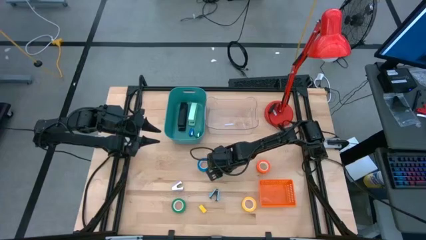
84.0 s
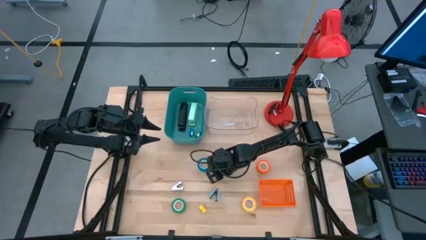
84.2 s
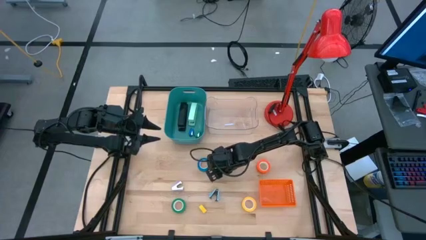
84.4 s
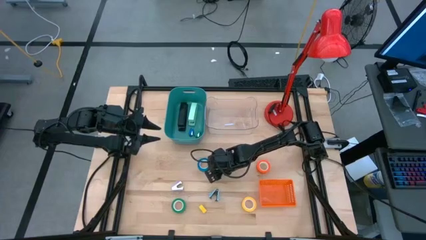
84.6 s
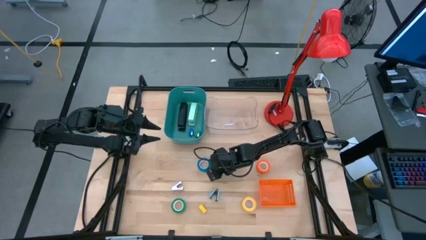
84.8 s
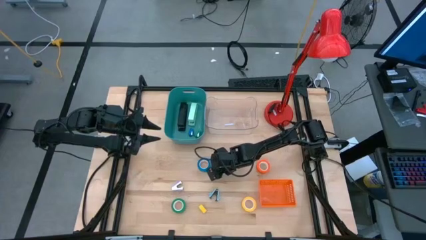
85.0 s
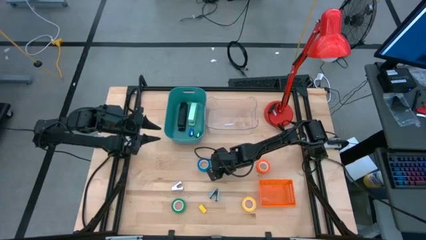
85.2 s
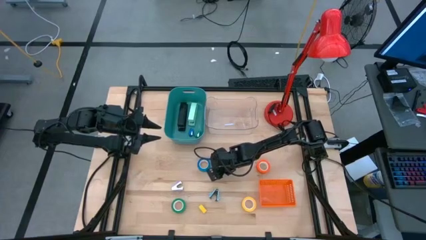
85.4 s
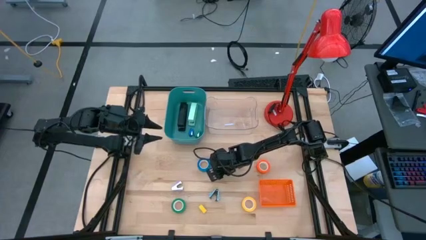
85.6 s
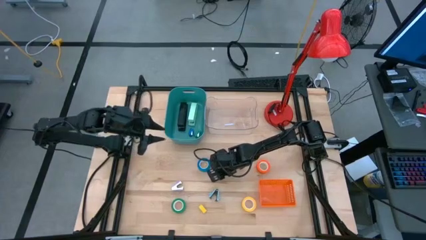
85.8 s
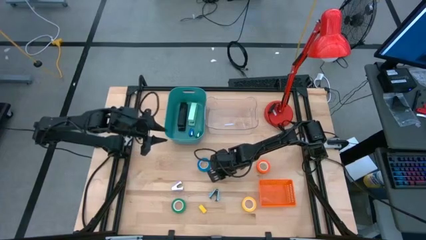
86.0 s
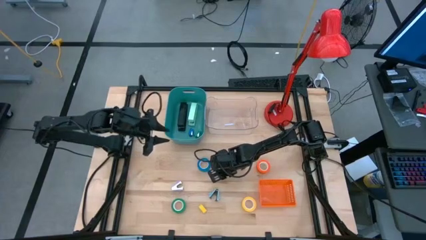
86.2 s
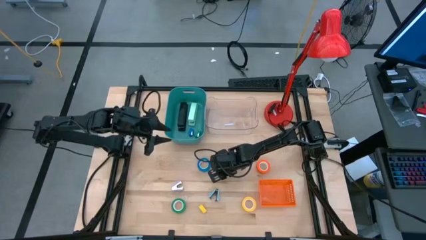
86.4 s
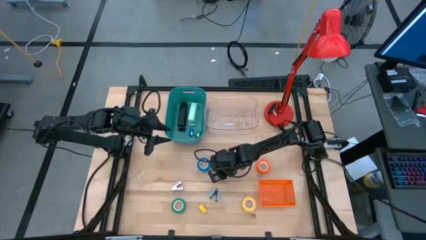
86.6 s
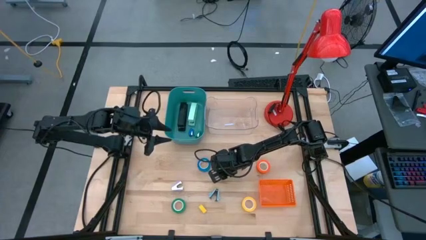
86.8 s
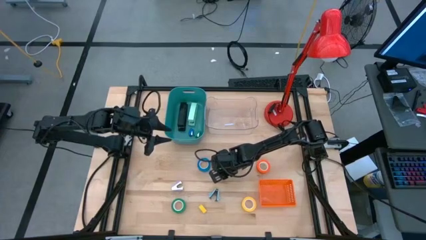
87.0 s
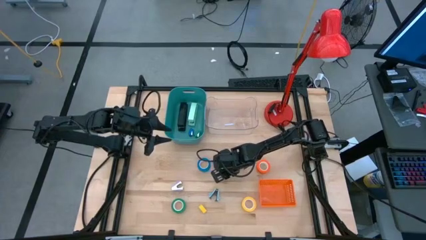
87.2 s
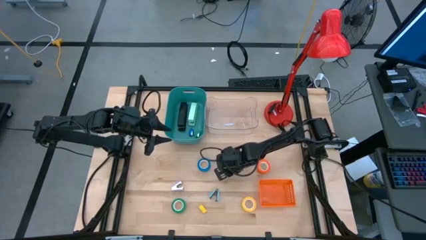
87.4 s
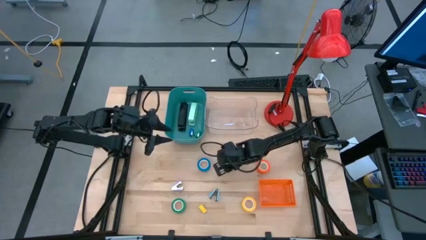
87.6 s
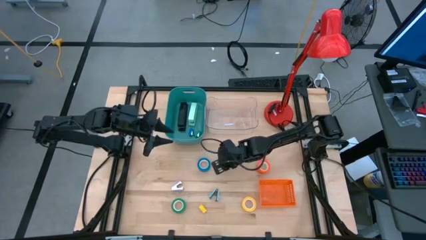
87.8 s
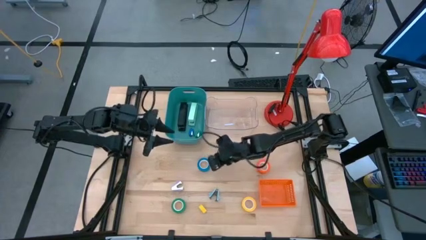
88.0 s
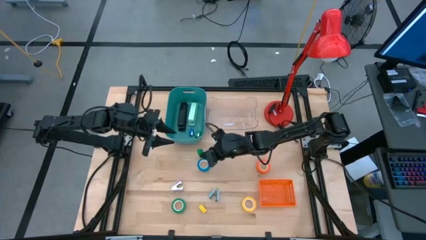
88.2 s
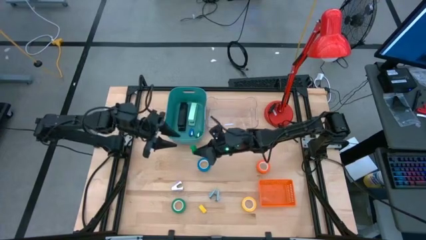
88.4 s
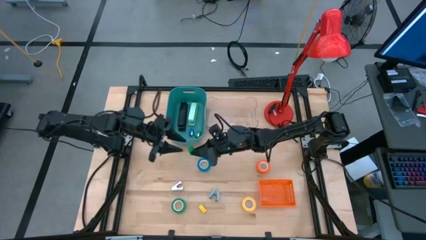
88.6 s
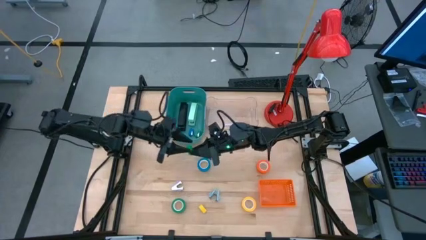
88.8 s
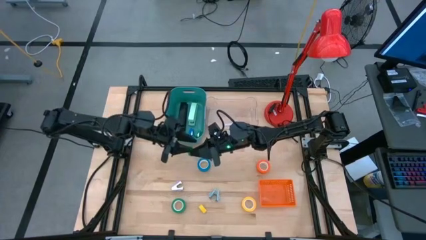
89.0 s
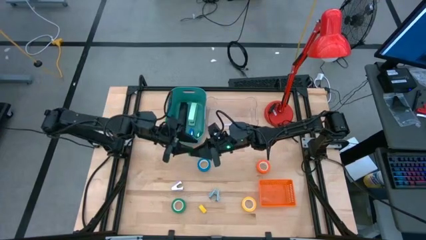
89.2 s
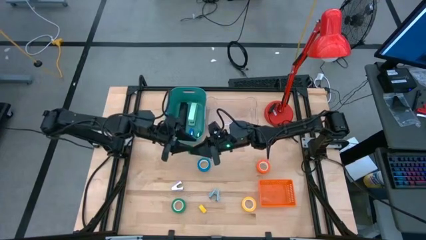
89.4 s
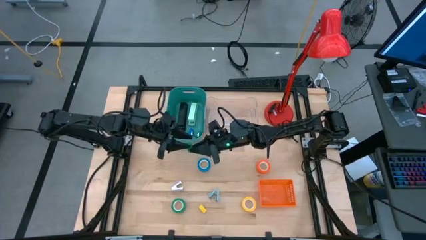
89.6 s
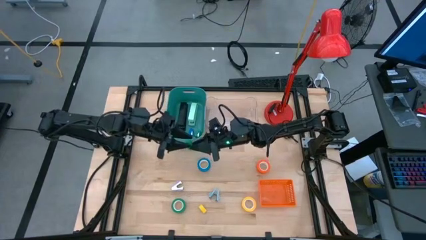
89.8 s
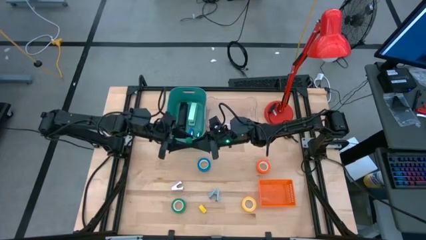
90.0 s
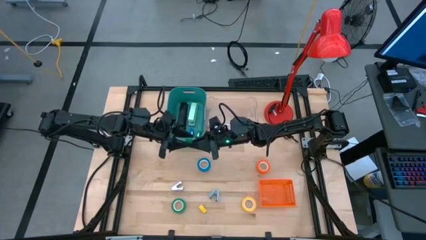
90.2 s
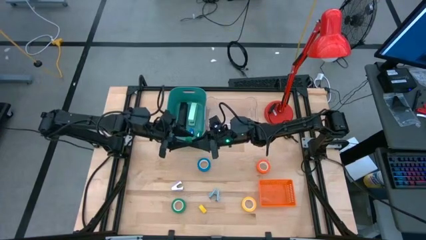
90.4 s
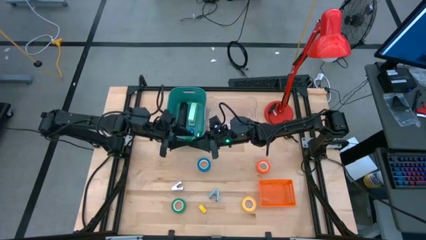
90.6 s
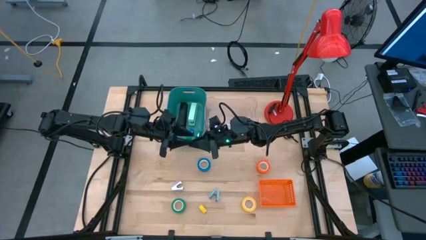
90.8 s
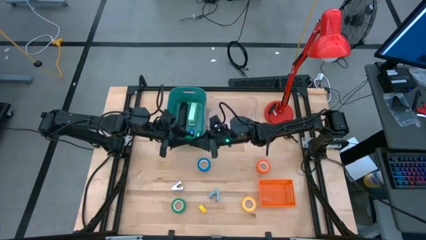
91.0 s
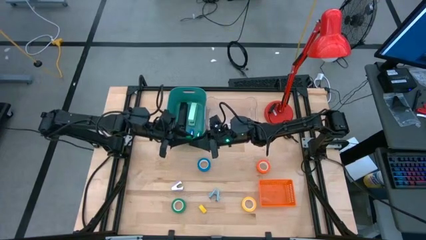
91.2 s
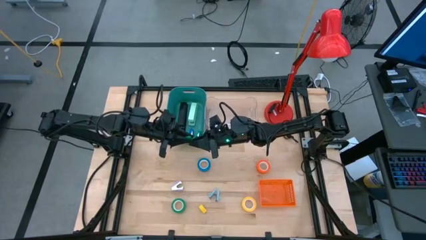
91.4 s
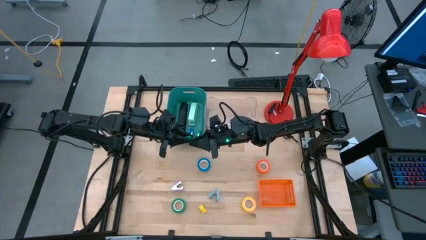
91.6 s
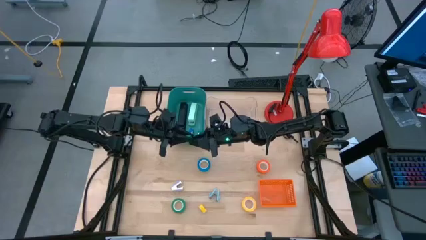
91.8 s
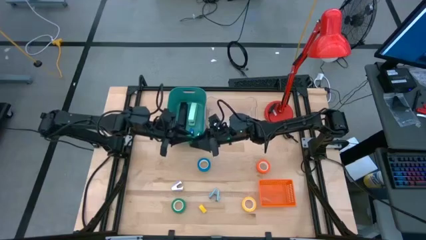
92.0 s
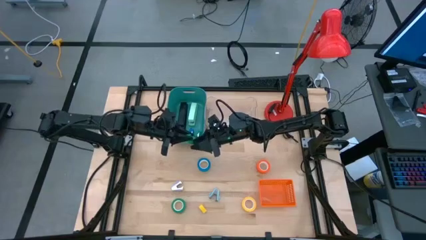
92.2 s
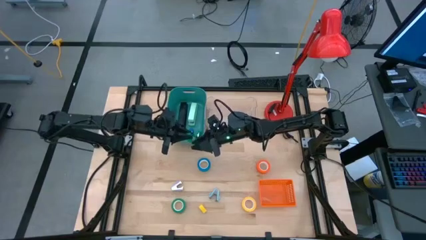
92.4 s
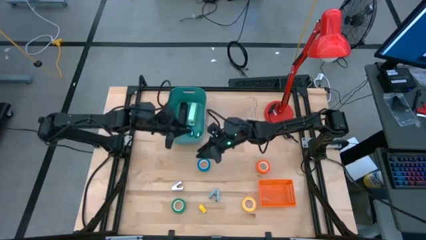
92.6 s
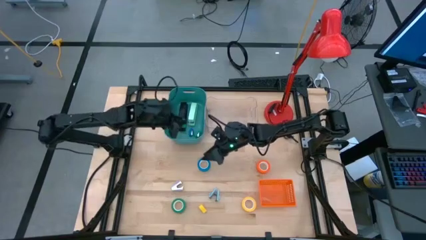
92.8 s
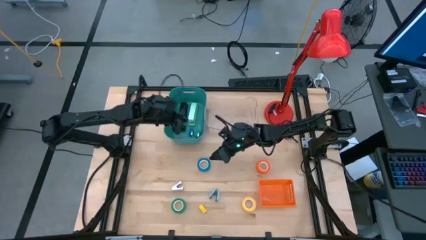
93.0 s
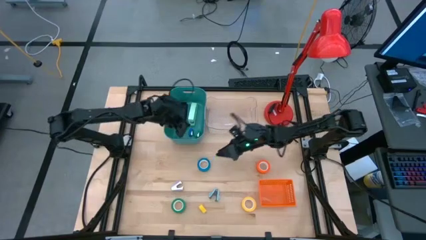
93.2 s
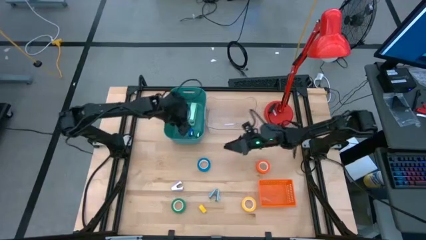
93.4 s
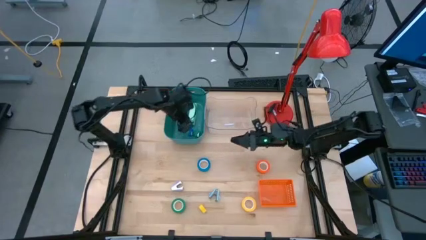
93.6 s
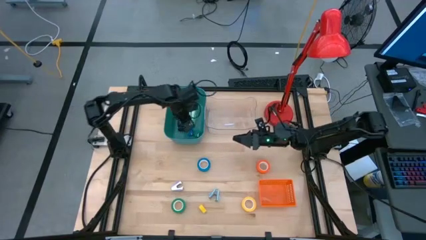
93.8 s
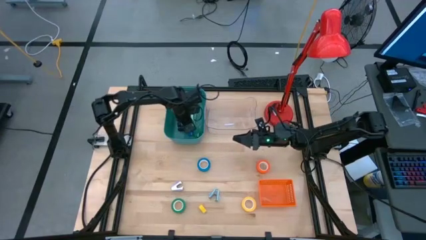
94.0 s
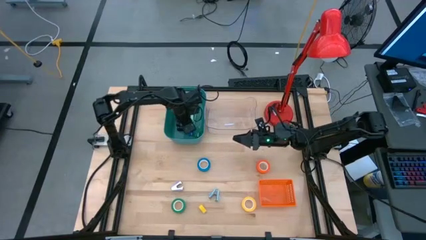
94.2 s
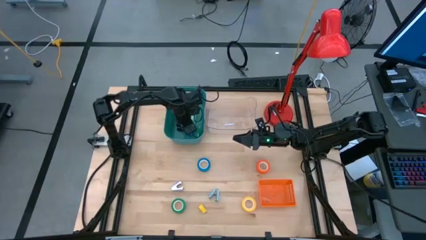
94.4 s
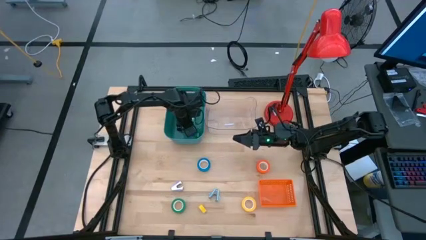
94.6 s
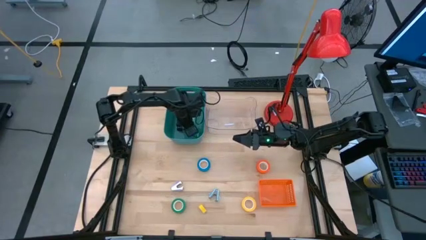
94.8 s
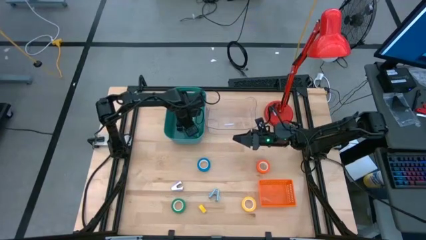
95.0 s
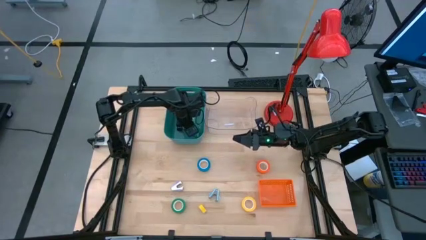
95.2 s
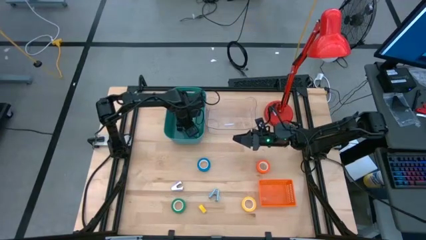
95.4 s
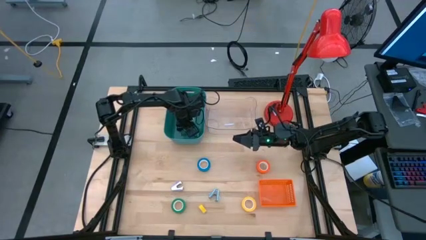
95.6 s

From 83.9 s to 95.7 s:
Task: Pick and place Stapler, Stapler remover, tape
Put the mini green stapler into the blue bin

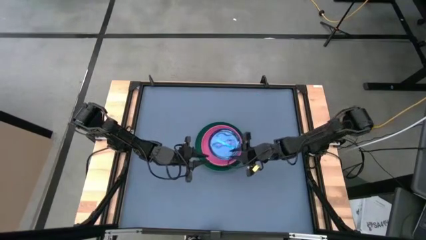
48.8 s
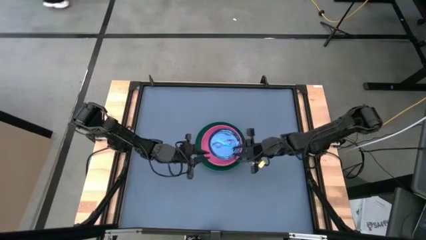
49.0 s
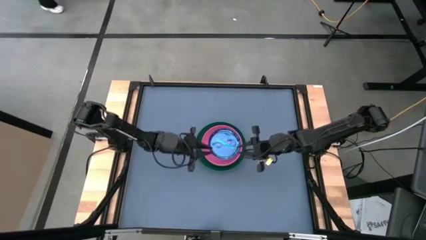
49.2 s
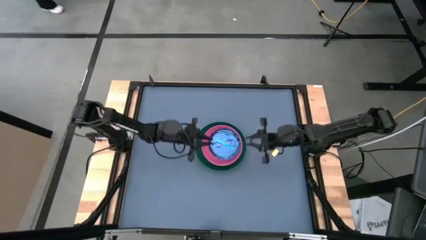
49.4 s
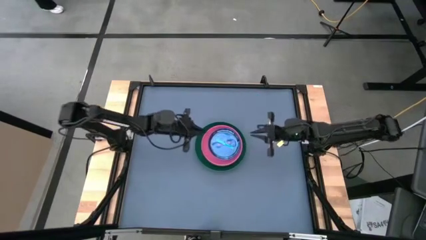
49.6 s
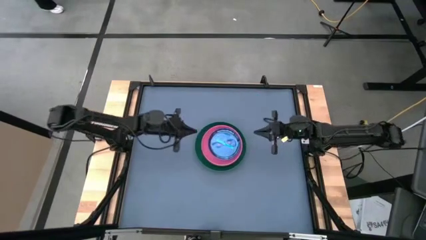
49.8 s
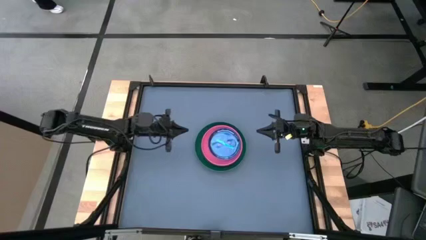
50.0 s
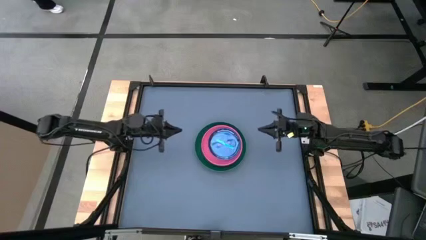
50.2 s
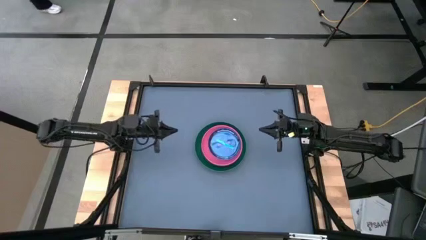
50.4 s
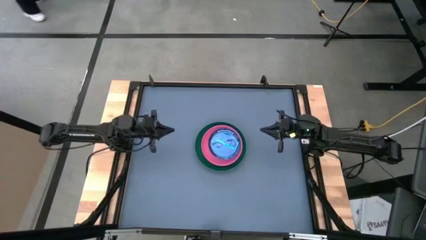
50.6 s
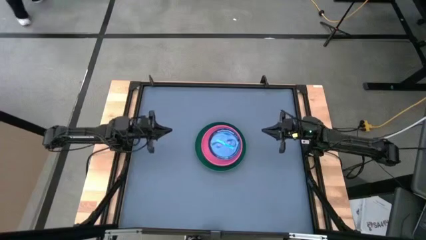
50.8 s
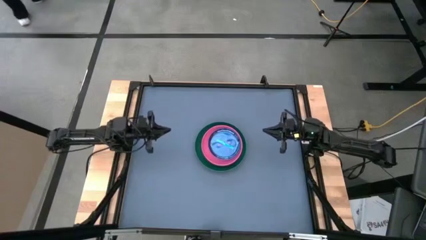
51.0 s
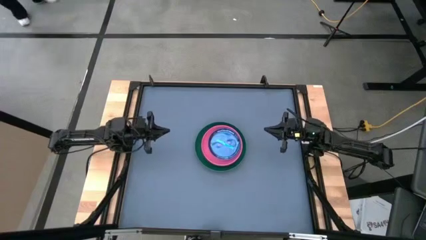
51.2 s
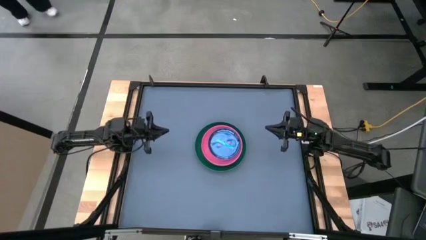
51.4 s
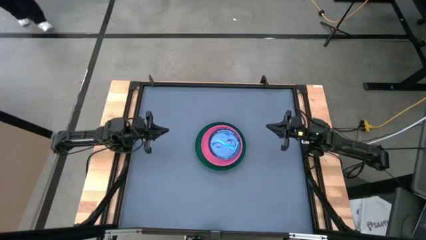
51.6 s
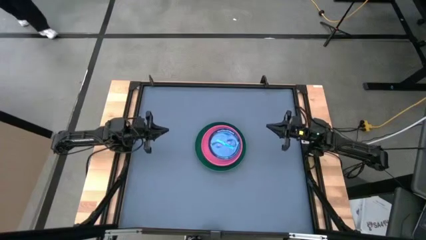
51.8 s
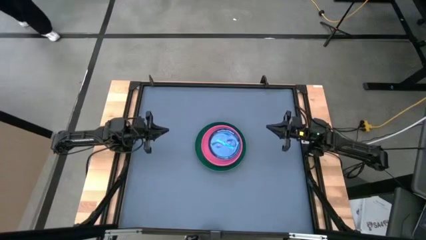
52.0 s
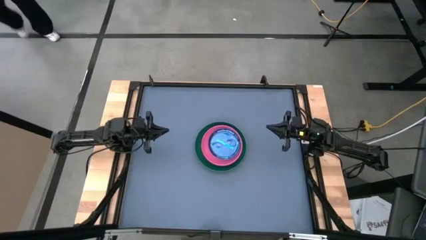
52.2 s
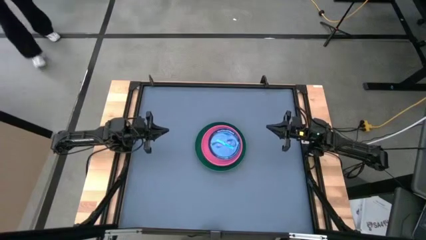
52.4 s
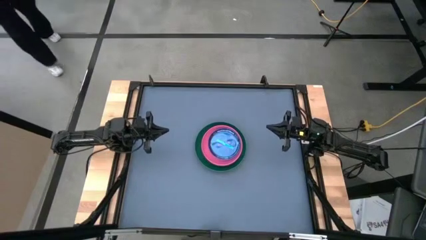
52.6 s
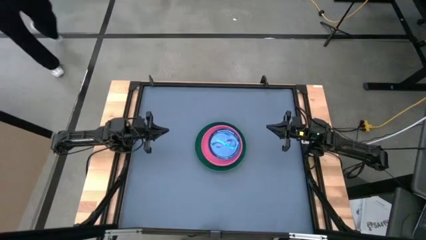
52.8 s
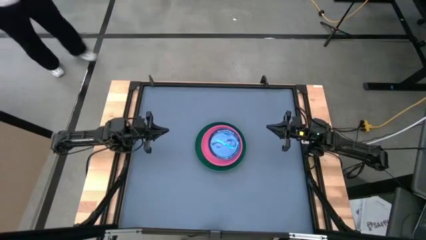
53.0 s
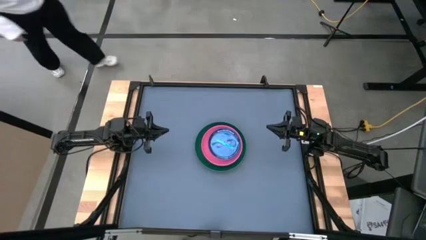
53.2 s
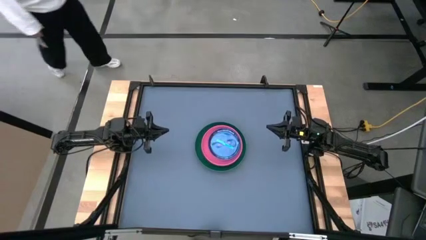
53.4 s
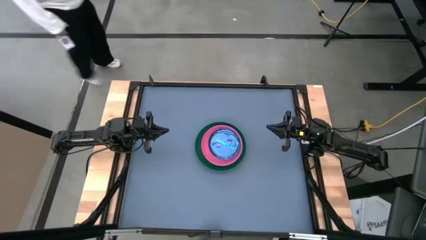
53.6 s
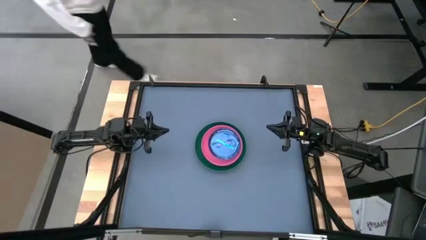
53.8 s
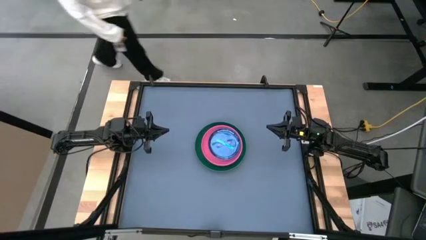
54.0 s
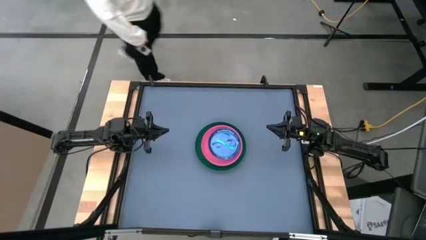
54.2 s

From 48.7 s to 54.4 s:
Task: Stack plastic plates
Return to Home Position
